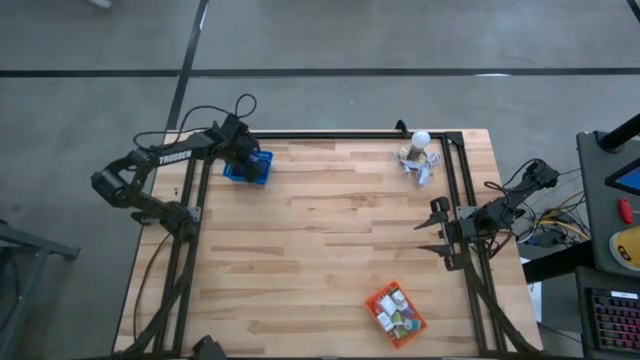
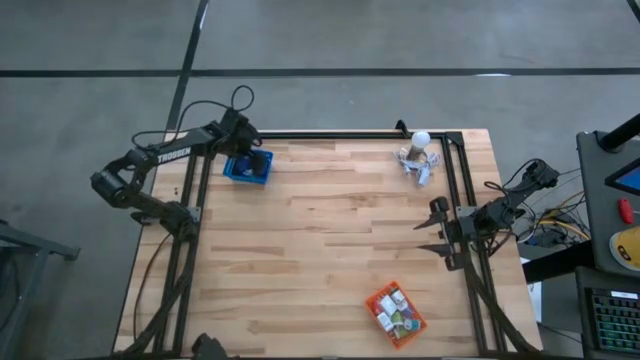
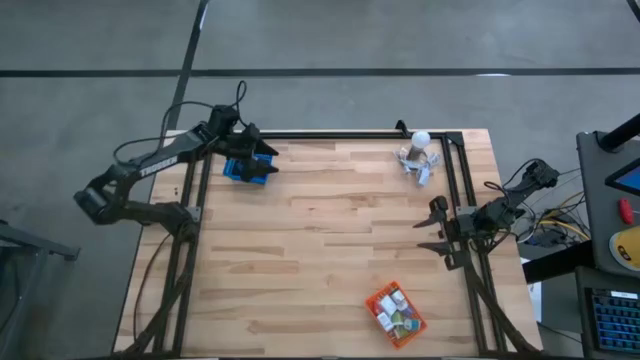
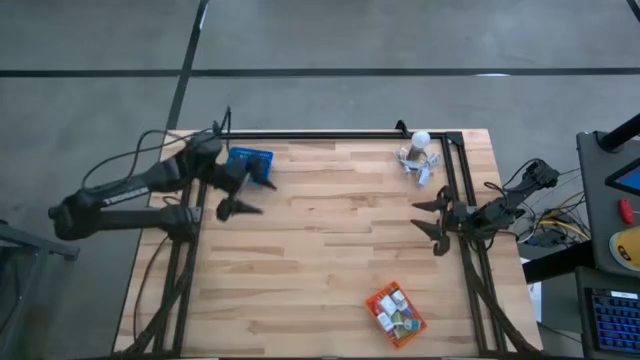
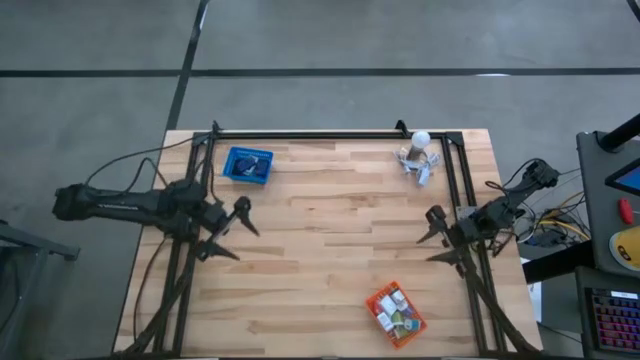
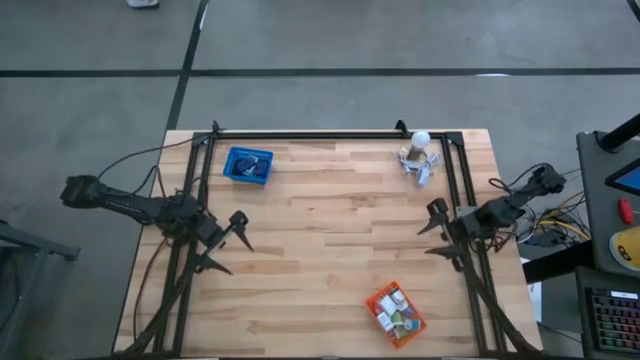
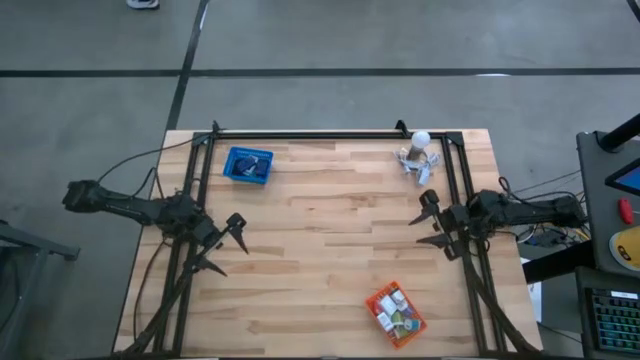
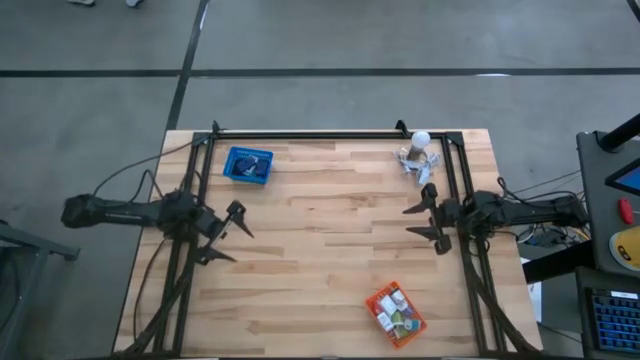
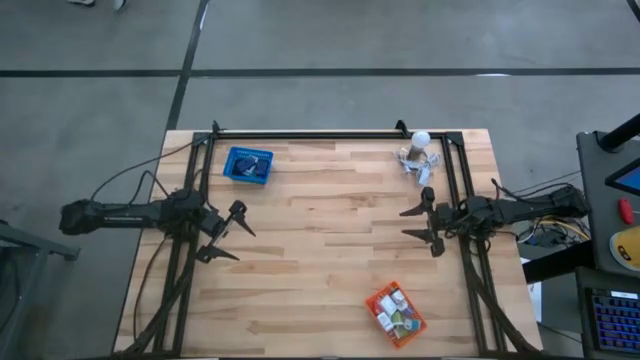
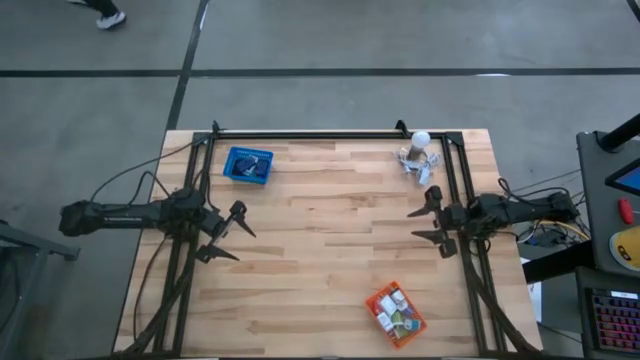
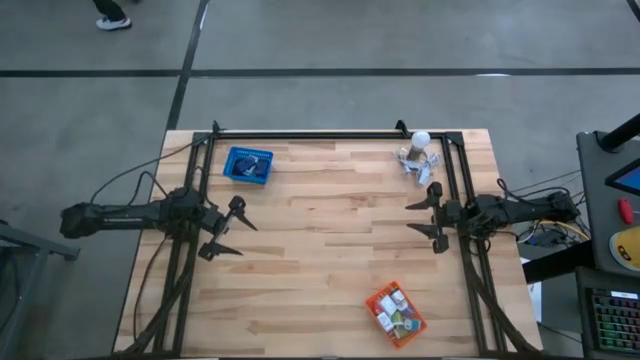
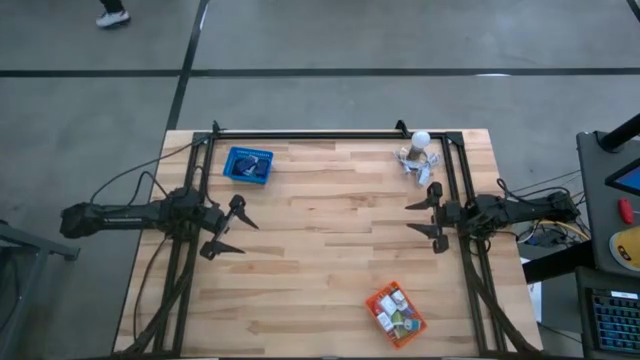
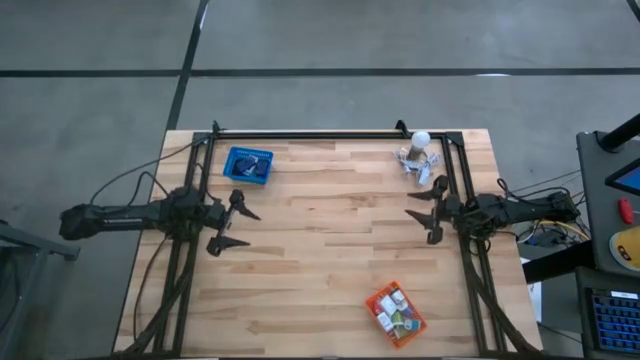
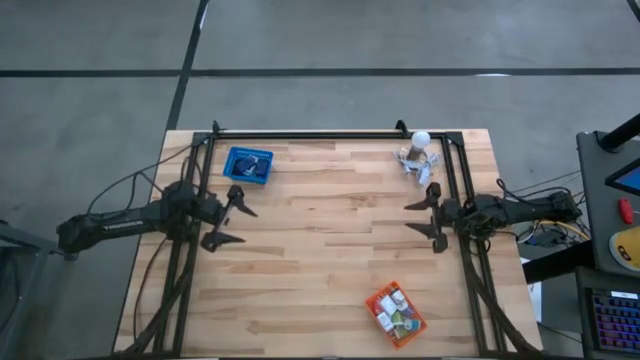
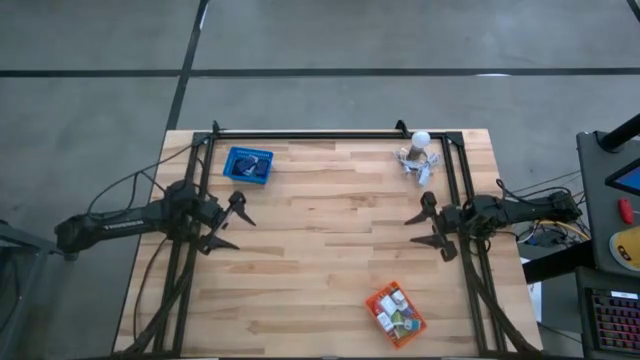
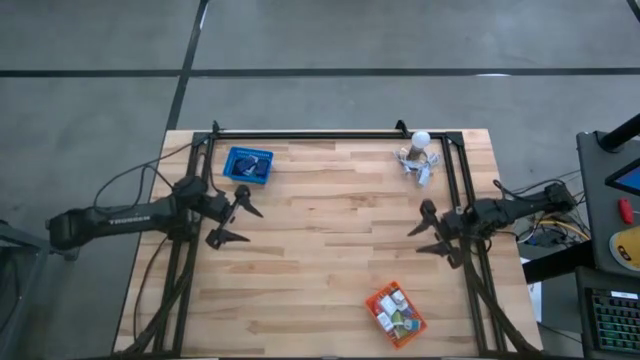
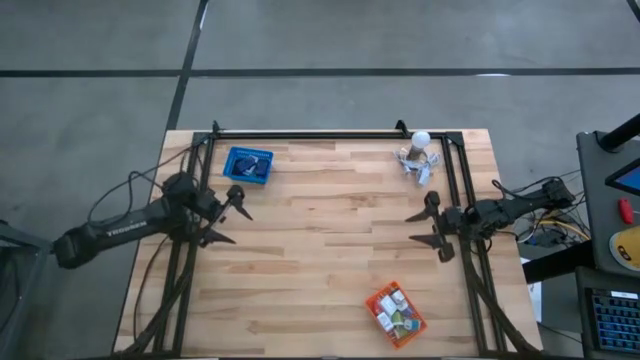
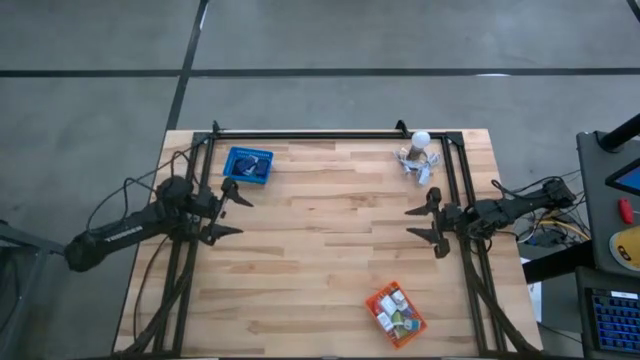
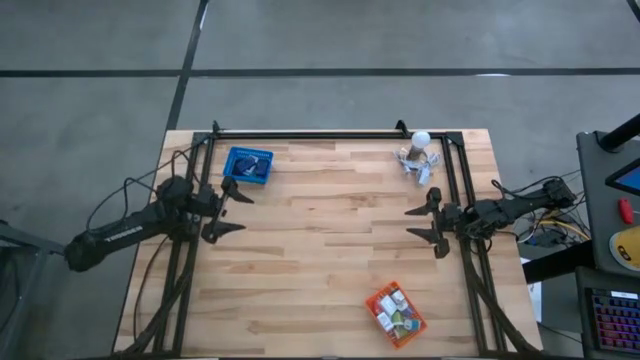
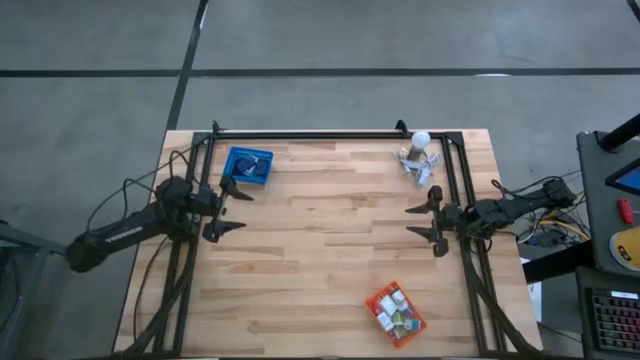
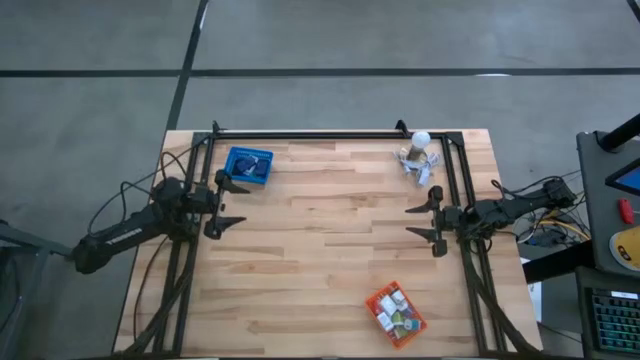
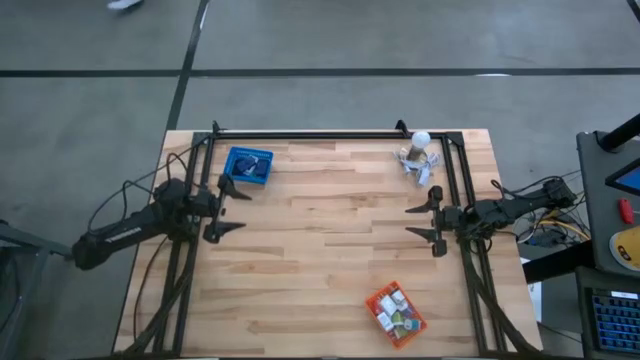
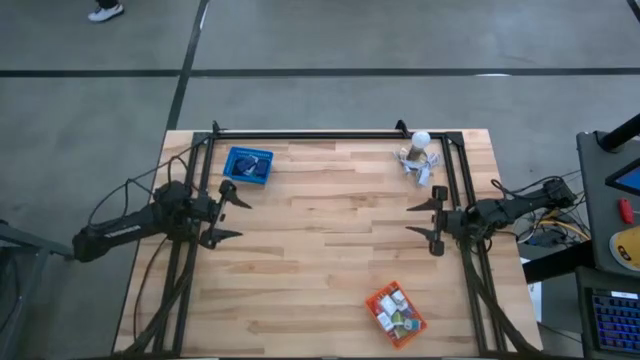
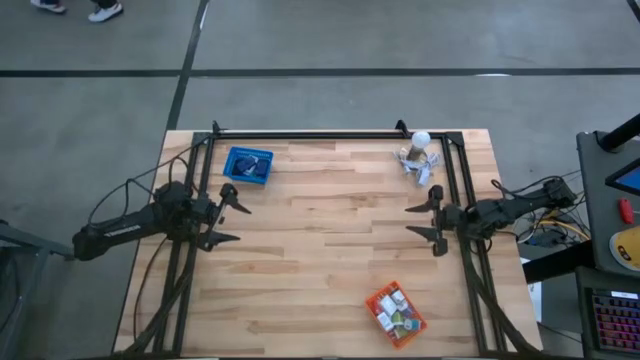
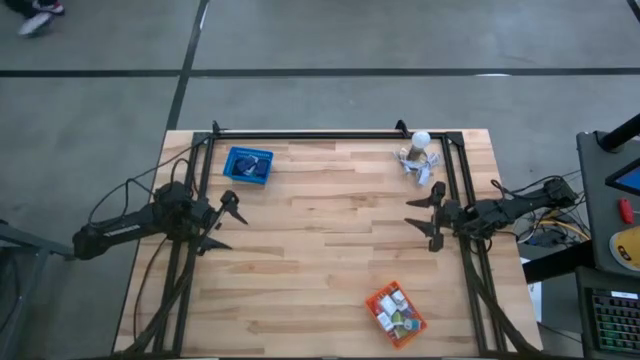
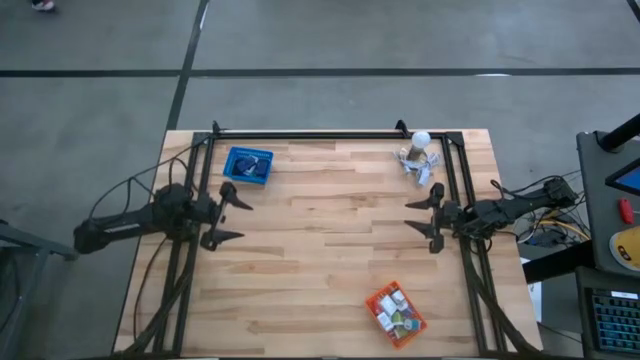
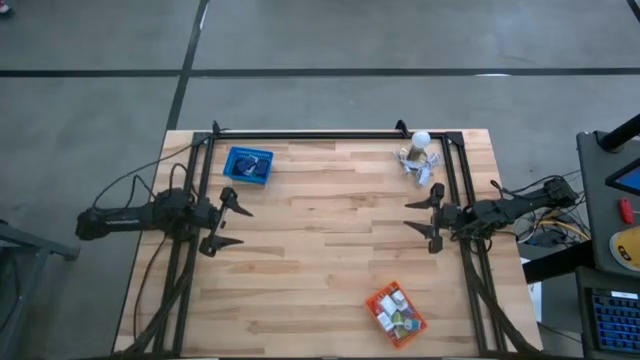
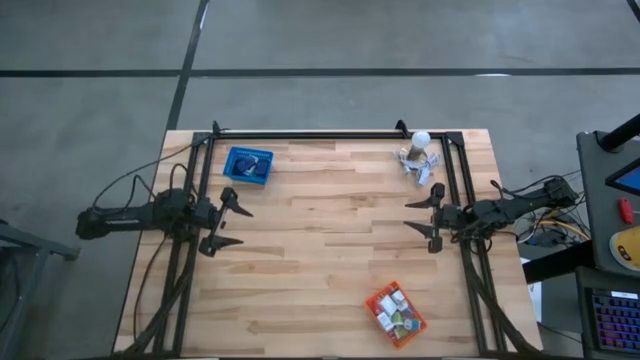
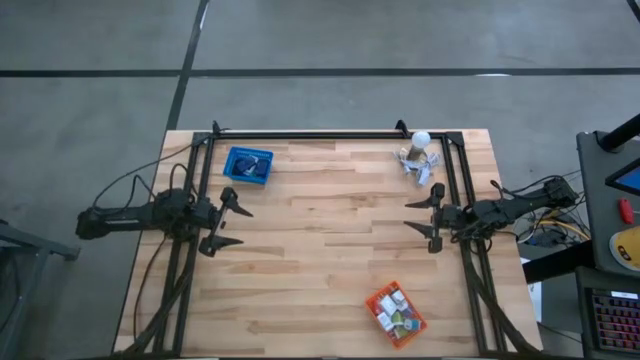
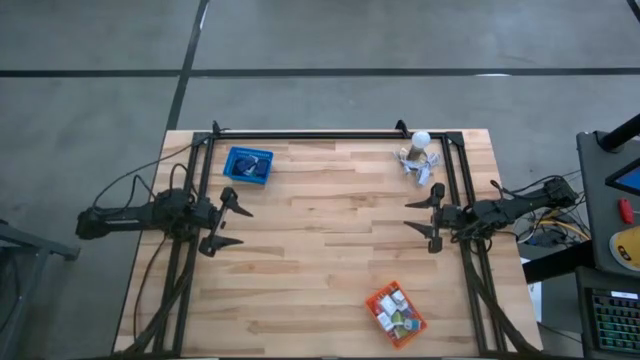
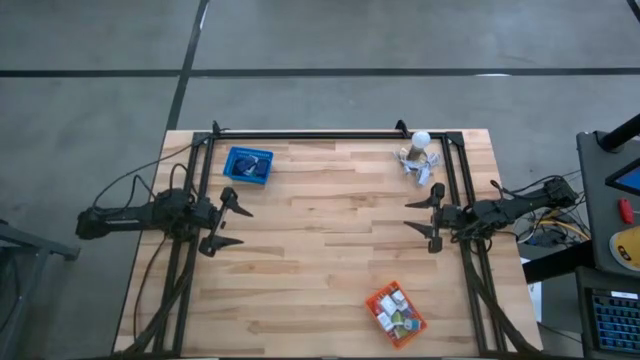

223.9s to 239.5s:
Task: Pick & Place Office items
Return to Home Position

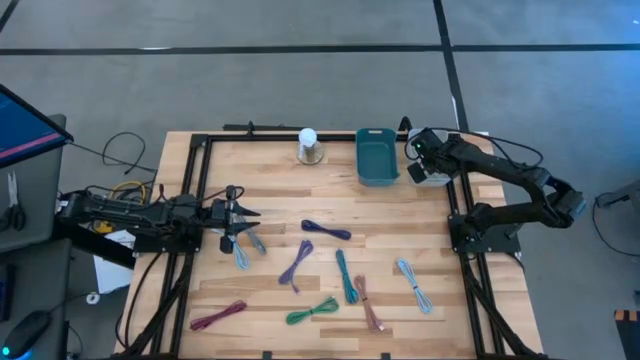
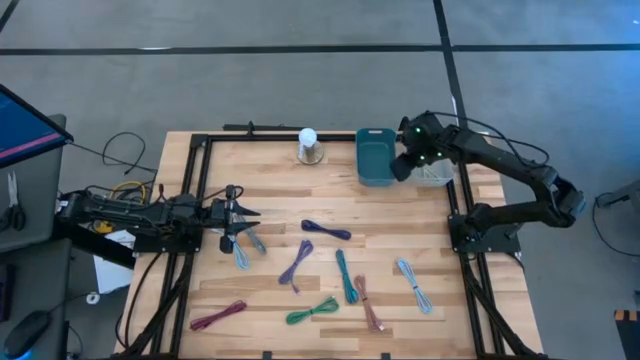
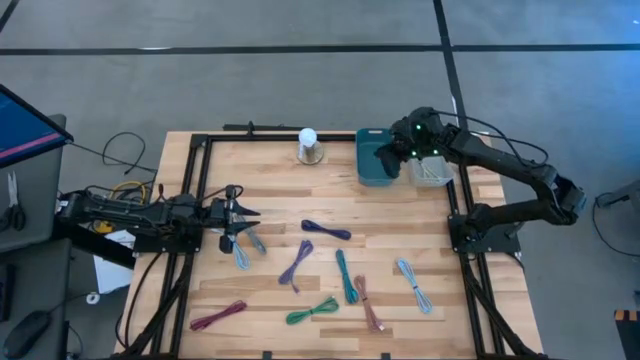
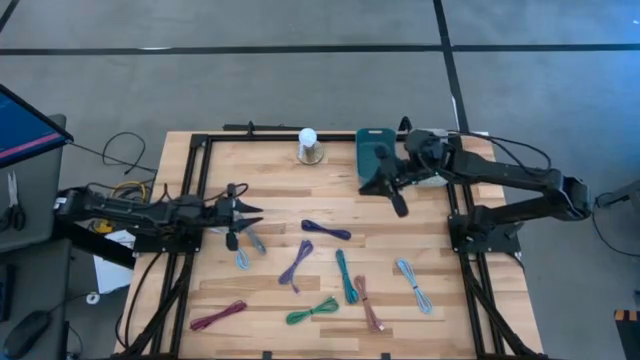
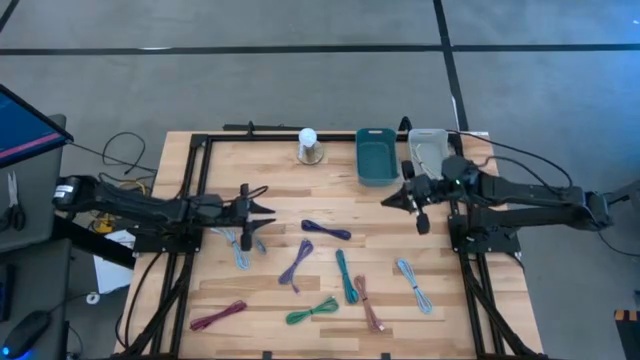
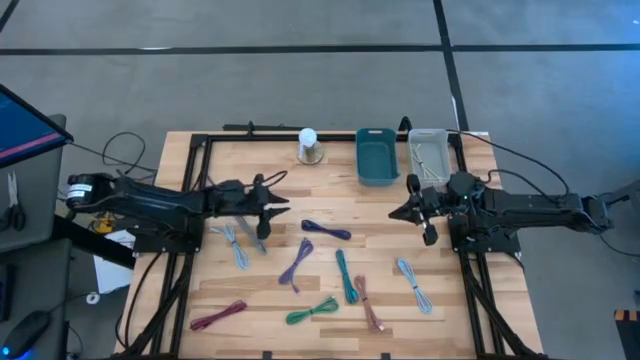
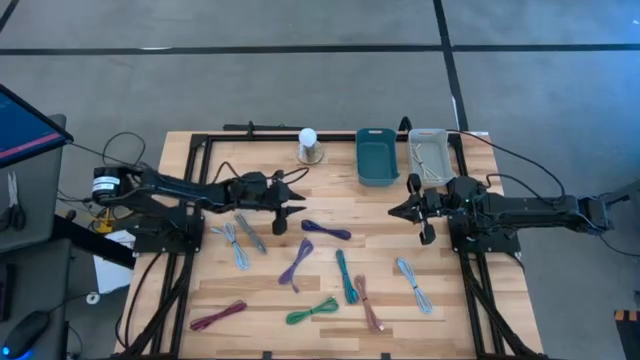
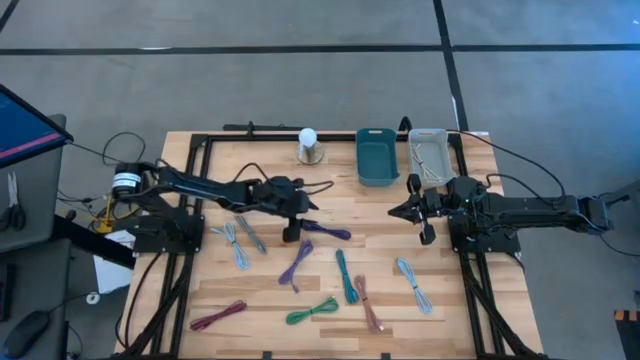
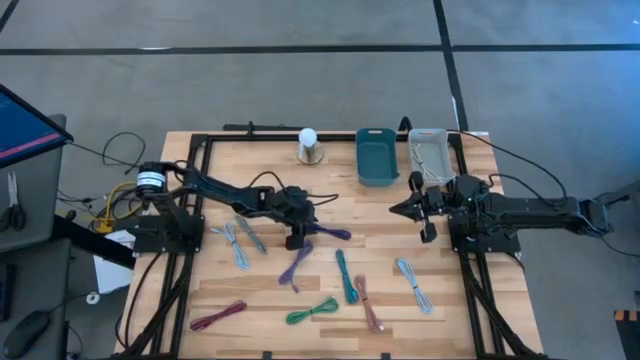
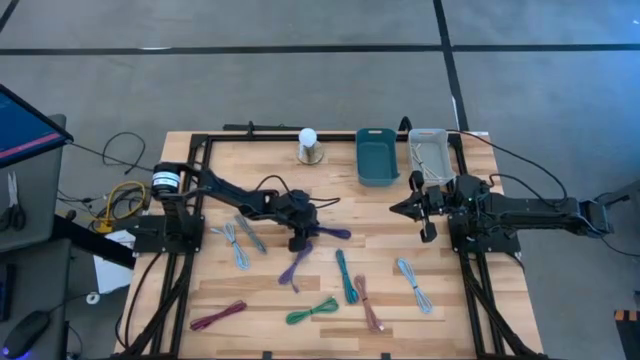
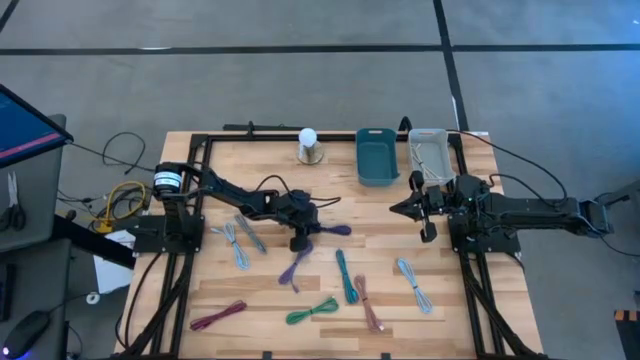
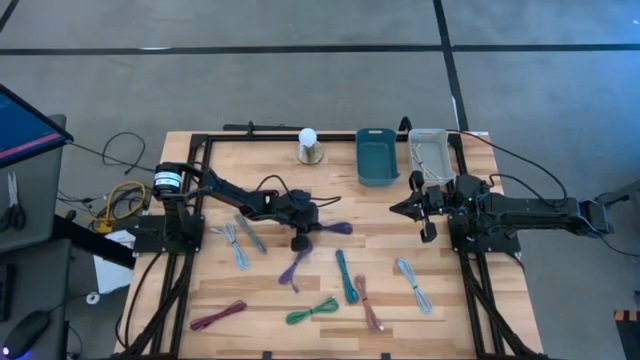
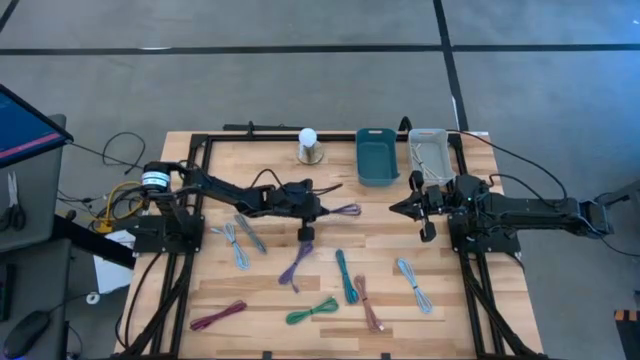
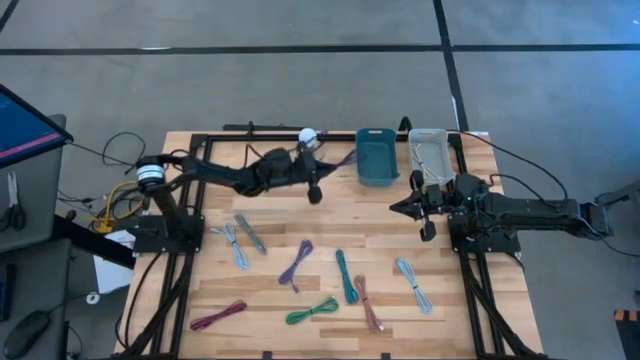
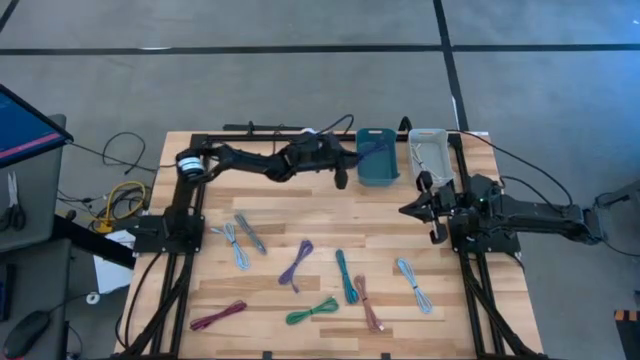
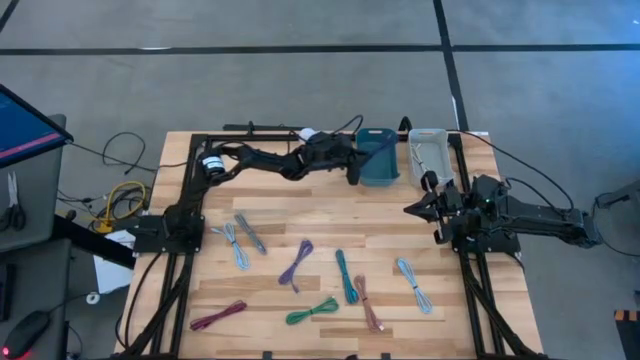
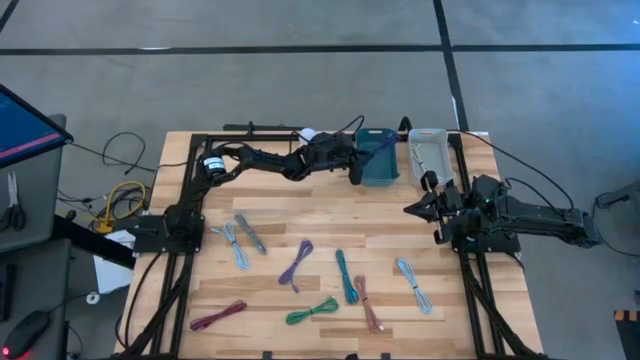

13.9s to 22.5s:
Task: Pick & Place USB Port
Put the braided purple charger cable into the blue bin
